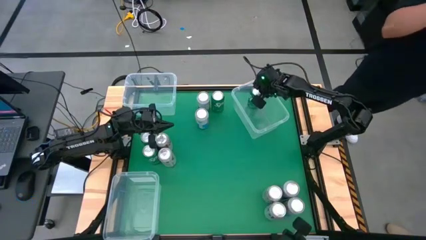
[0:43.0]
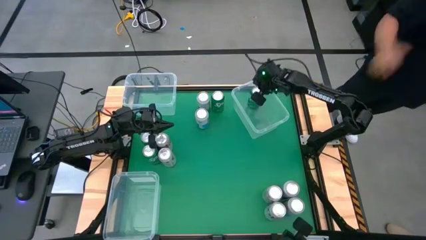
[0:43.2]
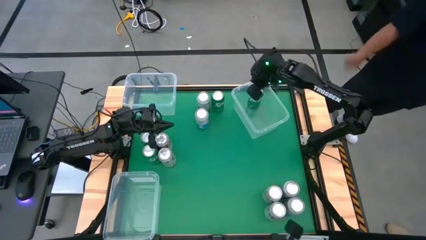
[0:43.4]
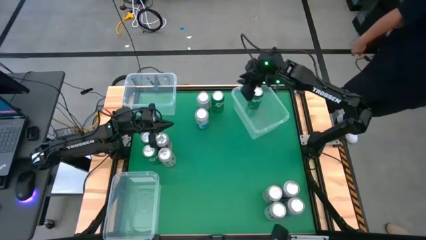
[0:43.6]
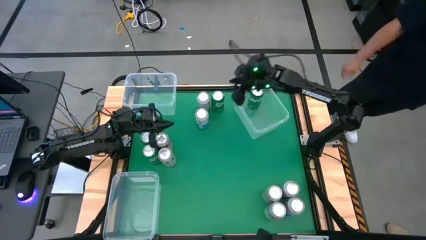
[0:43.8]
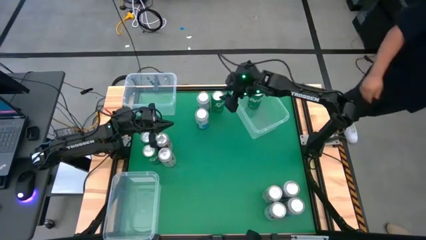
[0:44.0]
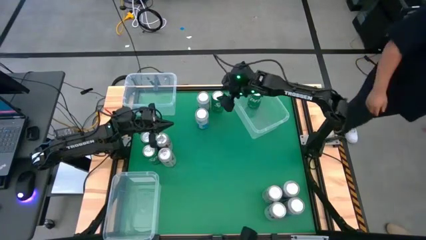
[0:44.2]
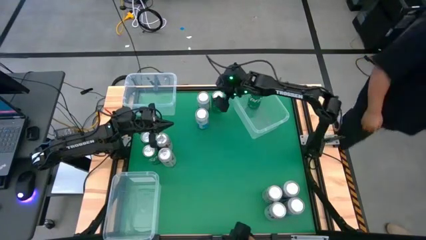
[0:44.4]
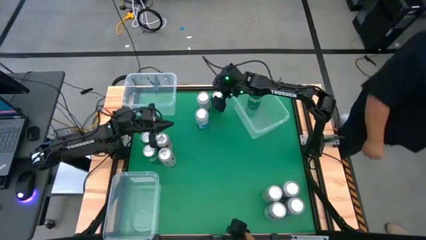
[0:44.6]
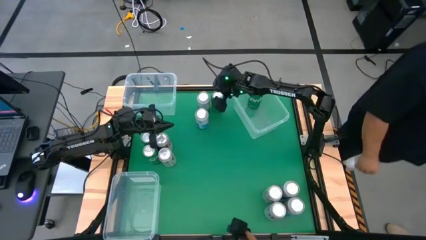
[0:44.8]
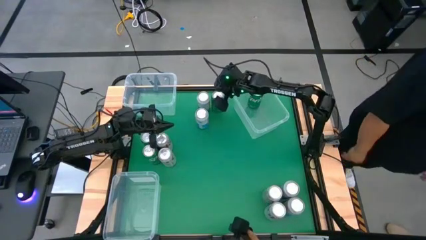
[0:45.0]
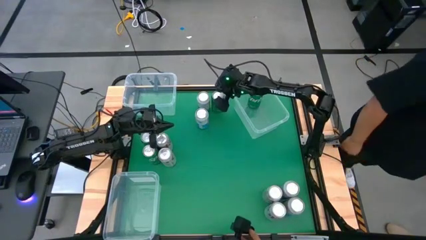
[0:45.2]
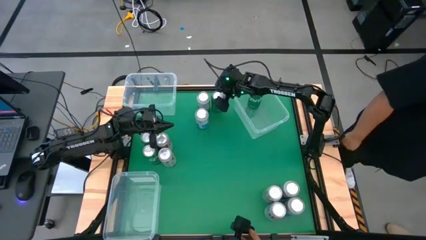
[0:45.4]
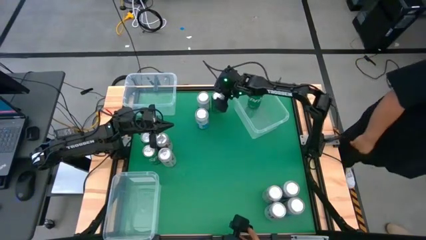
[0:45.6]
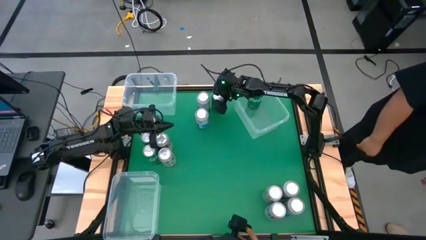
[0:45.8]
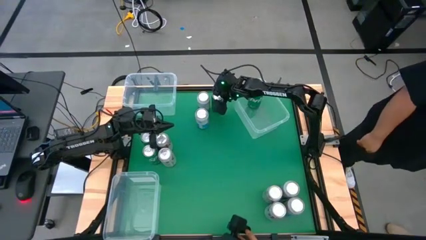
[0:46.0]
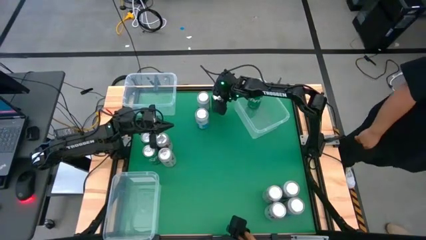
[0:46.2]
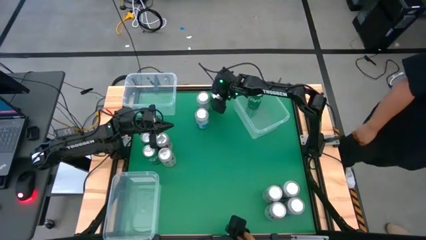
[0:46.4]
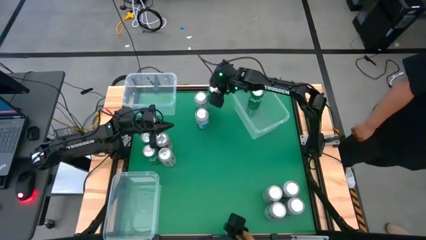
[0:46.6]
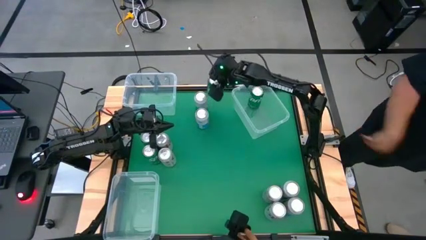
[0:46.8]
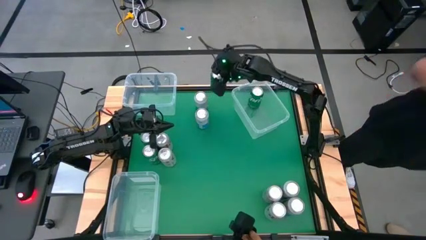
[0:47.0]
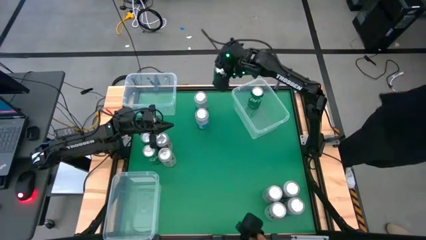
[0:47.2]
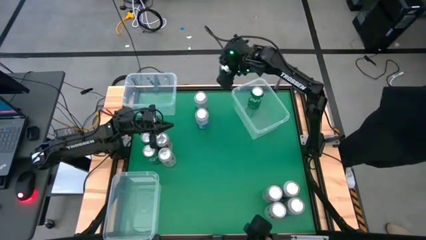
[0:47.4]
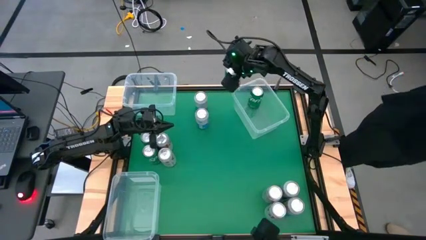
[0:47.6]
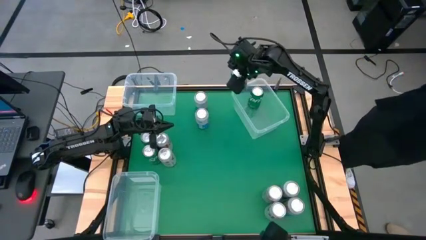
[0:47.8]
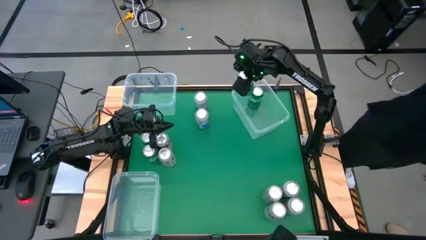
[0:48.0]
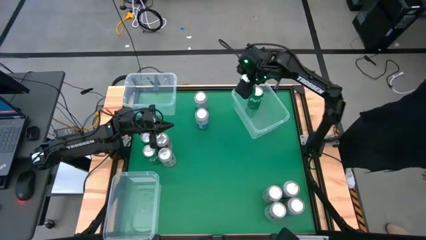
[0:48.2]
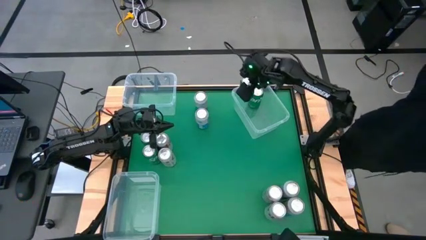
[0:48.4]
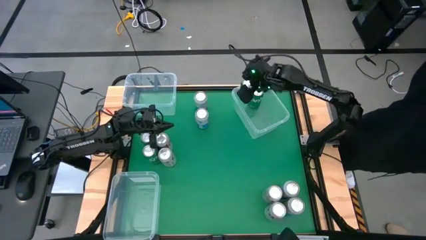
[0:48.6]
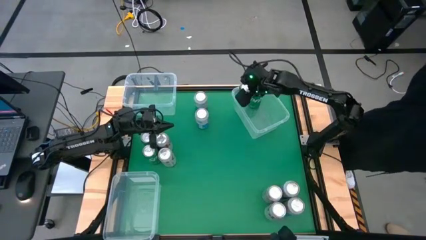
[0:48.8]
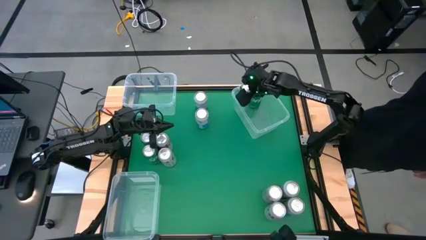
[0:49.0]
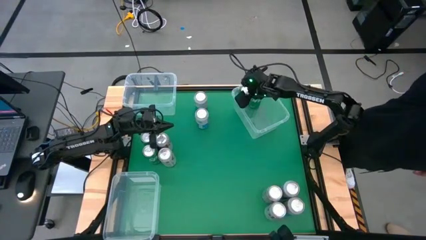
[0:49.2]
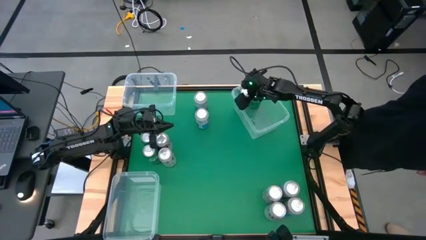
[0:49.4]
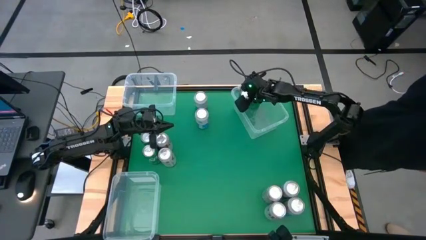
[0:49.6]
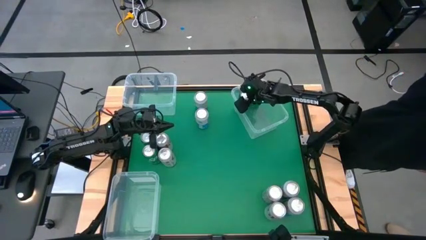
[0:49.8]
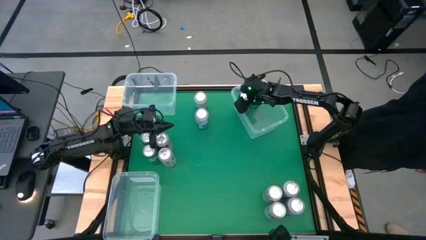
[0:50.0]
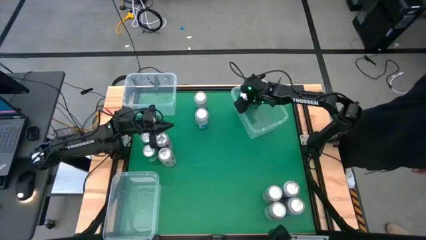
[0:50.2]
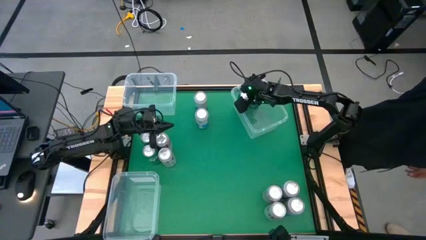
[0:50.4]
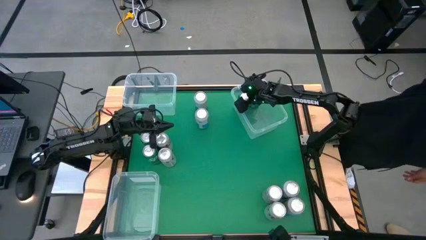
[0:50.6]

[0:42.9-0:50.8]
Task: Sort soda cans
Put the top right green soda can into the top right transparent bin

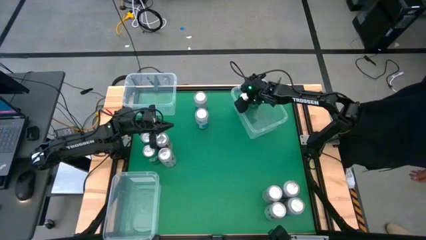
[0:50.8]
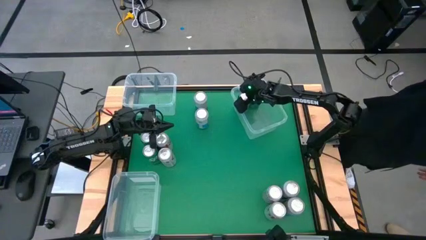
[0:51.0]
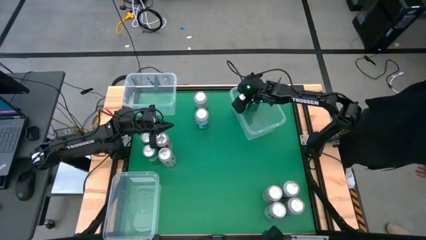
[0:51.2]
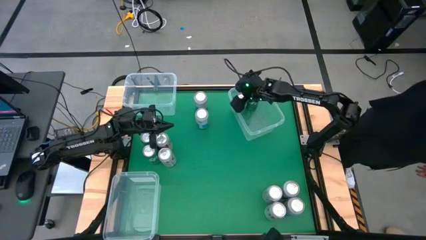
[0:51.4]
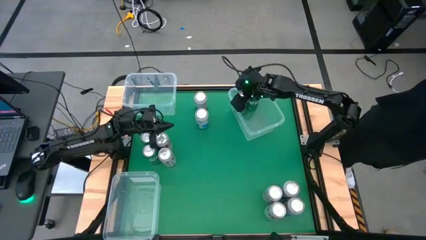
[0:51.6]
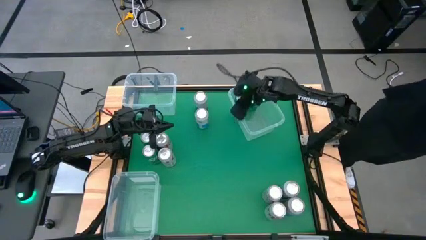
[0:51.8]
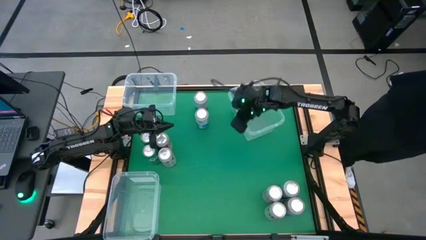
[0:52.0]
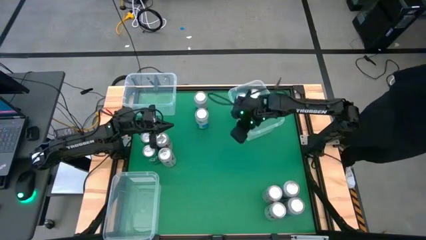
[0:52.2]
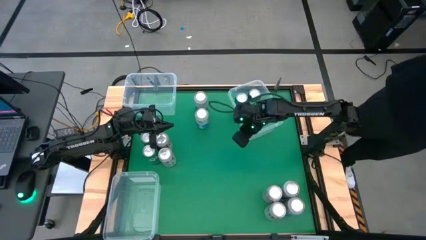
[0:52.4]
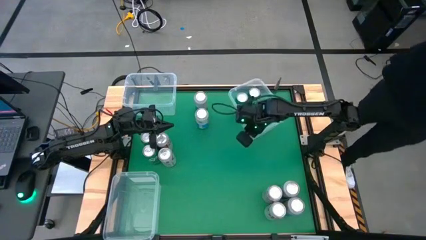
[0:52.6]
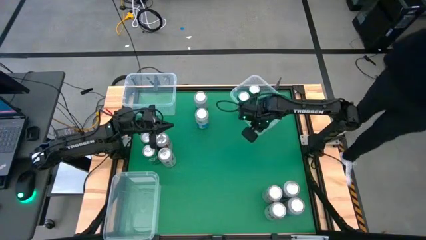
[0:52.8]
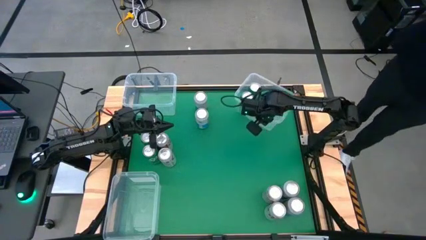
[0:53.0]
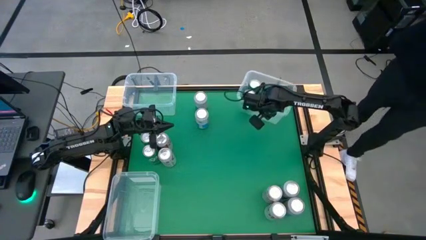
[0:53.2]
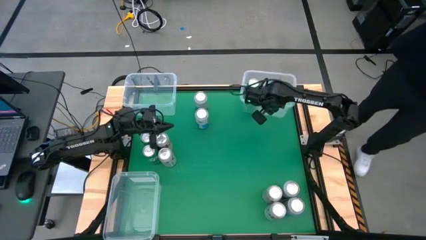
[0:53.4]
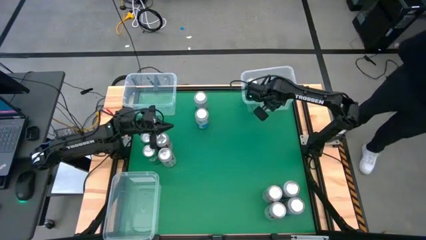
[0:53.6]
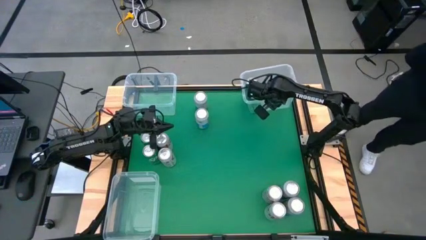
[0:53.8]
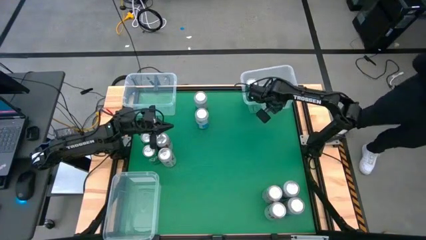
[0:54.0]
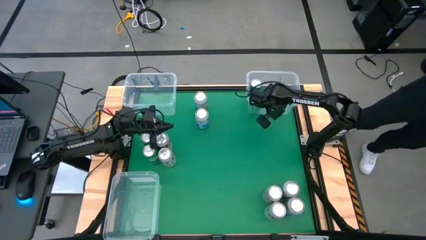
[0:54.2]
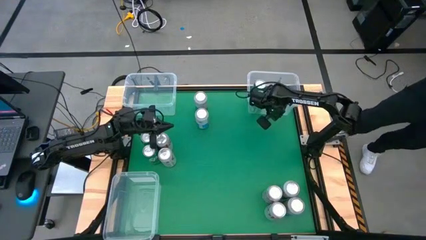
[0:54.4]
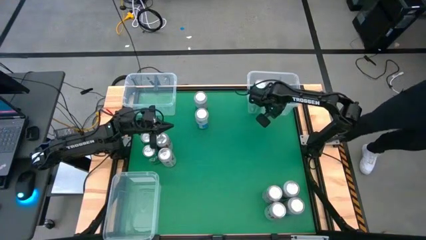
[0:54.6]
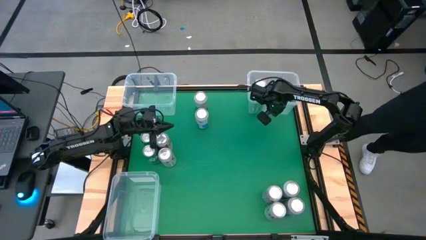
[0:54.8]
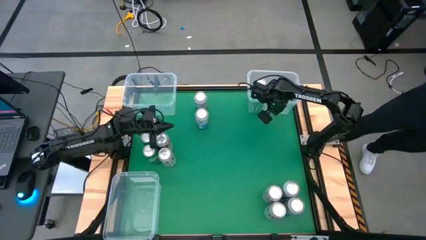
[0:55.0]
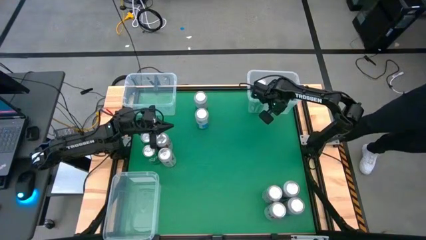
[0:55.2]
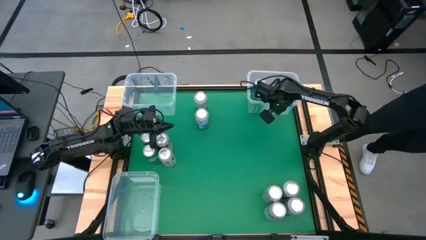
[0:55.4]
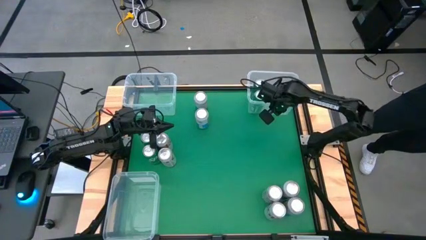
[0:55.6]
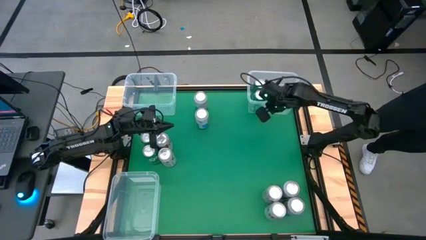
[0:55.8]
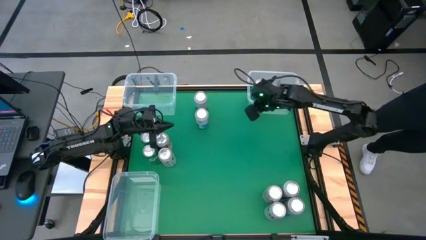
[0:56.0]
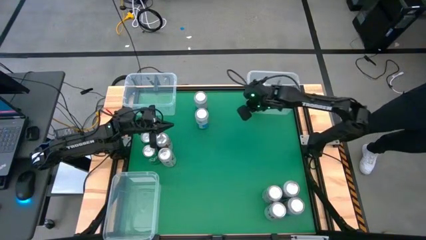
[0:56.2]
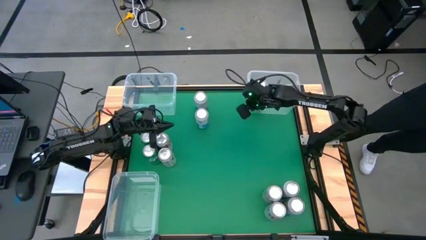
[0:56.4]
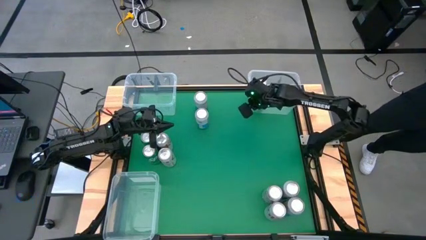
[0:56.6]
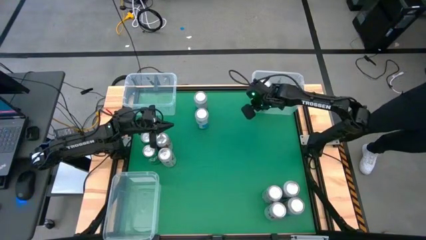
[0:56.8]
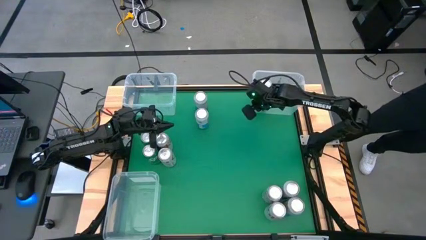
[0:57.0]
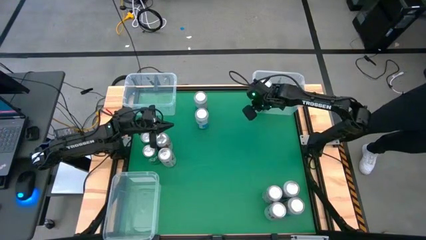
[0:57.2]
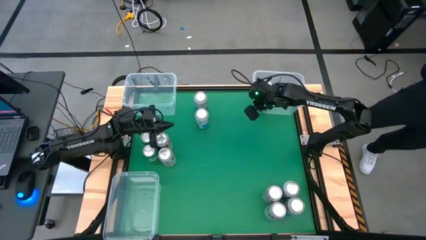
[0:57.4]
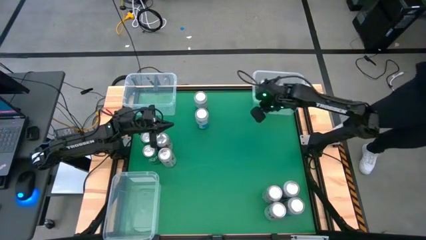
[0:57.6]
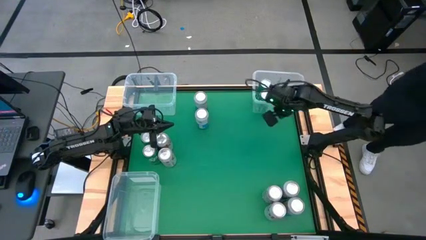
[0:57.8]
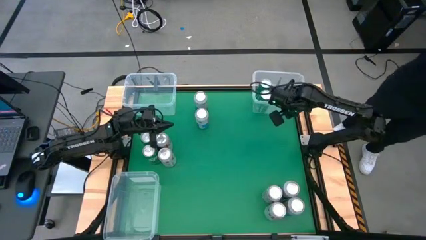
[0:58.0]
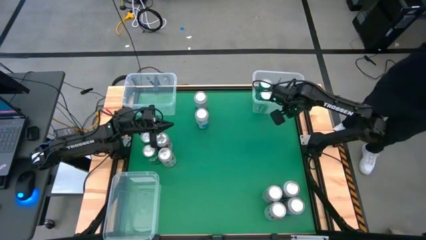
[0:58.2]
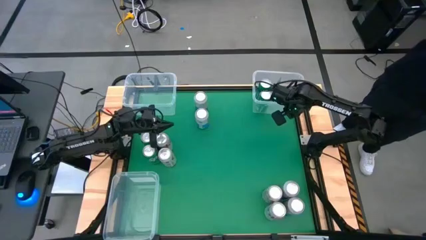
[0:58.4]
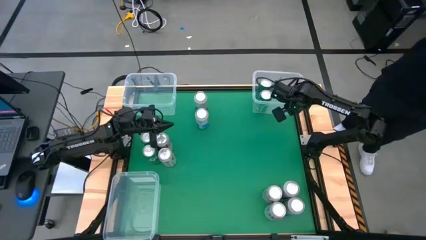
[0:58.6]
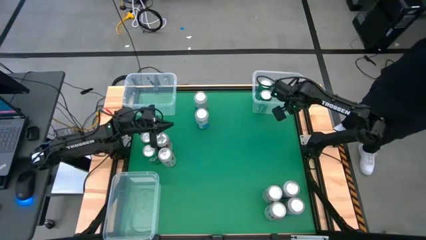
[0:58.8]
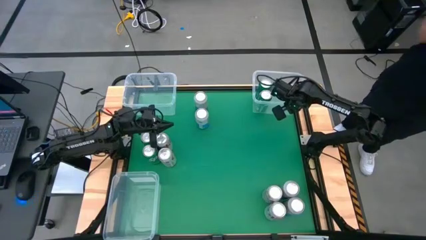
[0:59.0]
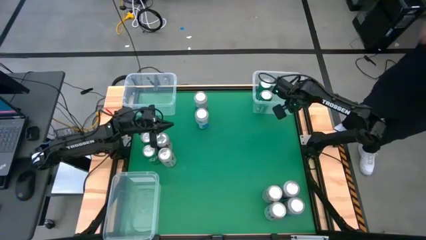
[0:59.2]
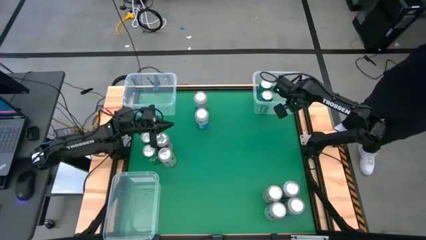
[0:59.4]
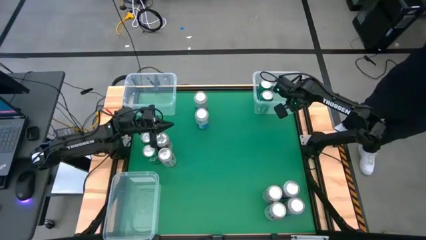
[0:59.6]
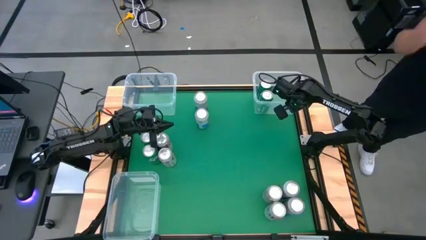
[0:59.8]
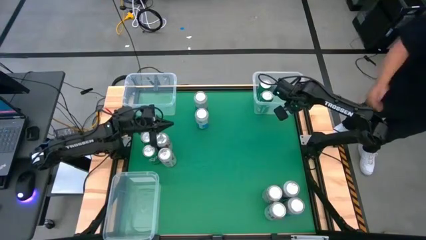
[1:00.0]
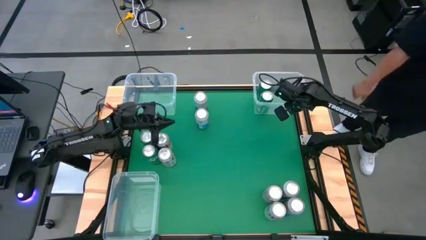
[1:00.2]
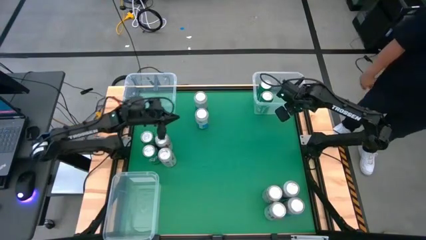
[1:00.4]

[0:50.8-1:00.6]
Adjust the right transparent bin

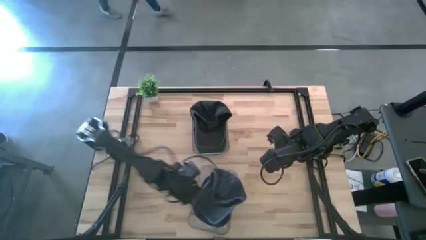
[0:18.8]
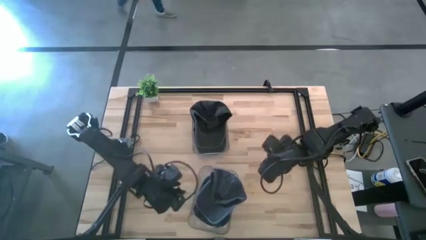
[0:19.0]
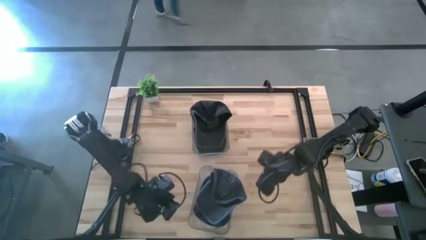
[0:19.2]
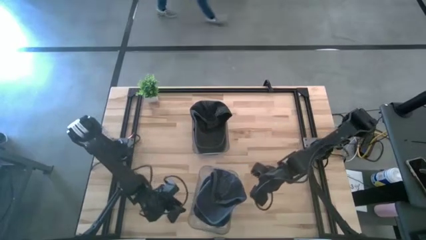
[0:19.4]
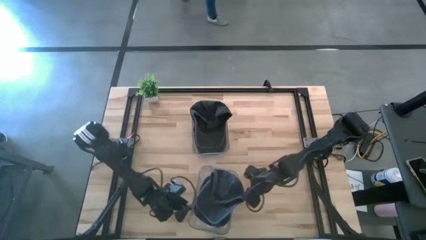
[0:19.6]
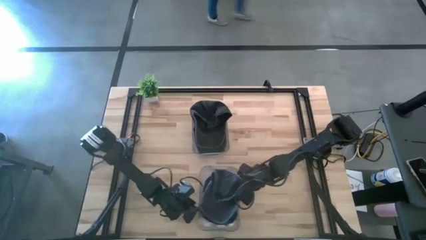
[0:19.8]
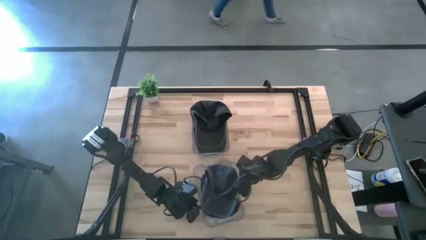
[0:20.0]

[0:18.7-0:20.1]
Task: Pick & Place hat
Adjust the bottom transparent bin
